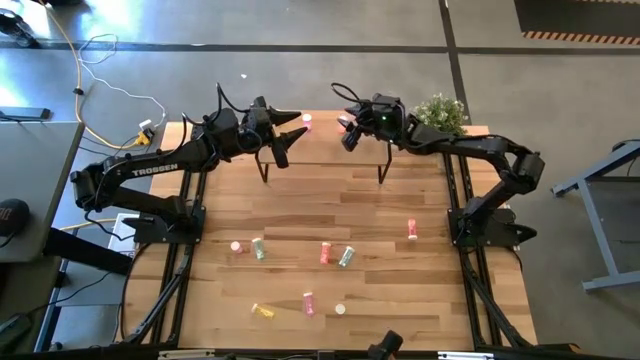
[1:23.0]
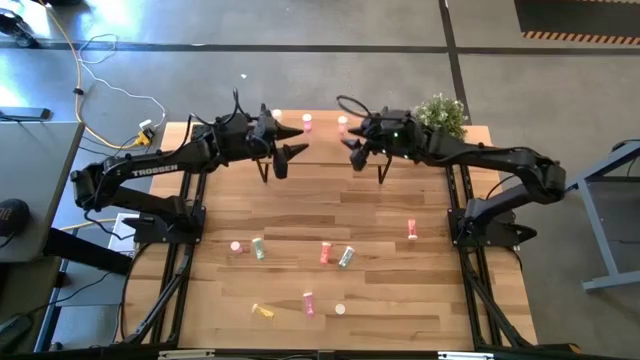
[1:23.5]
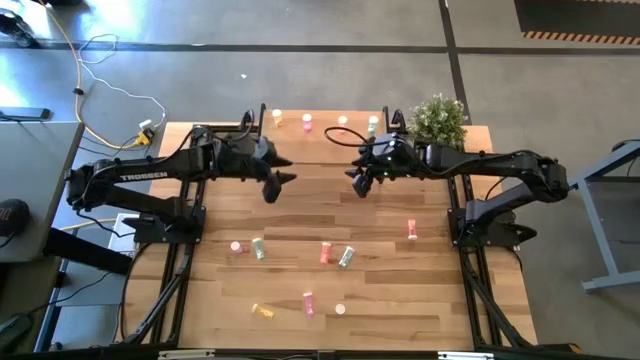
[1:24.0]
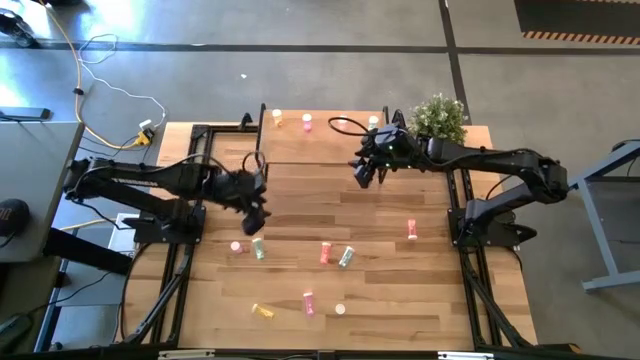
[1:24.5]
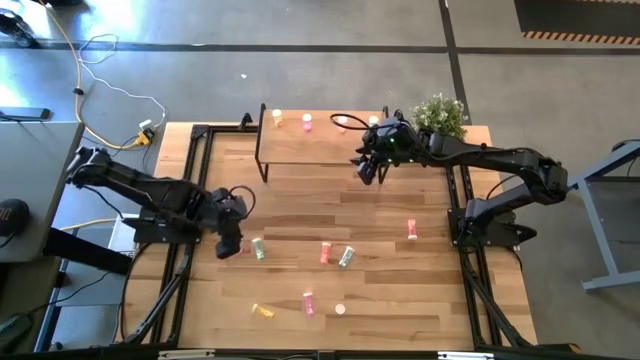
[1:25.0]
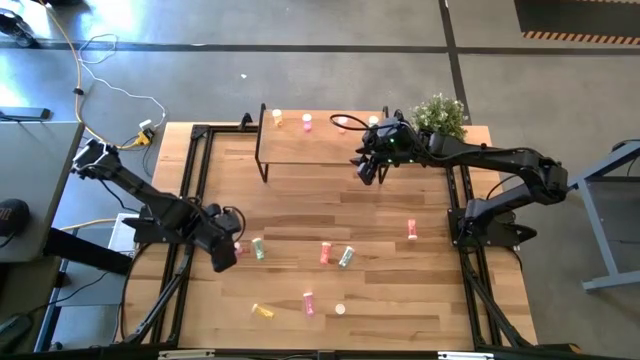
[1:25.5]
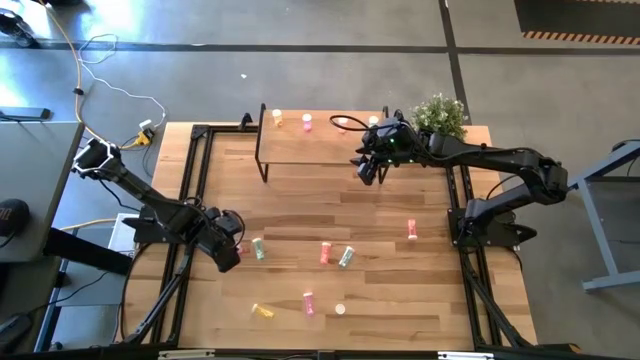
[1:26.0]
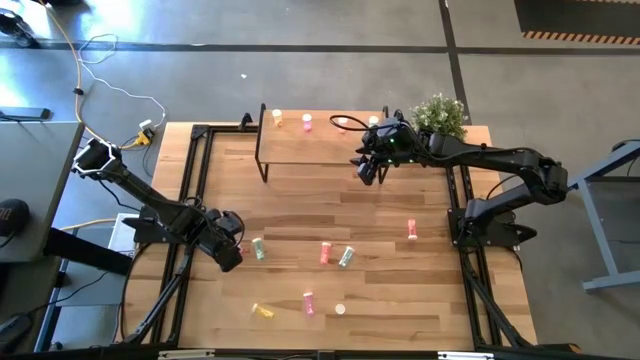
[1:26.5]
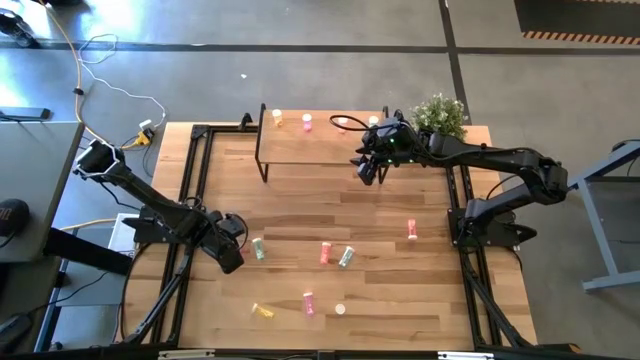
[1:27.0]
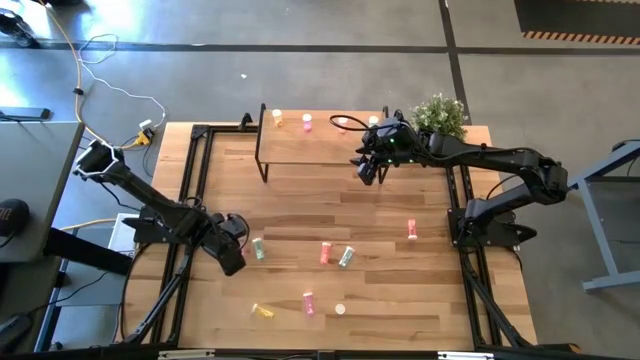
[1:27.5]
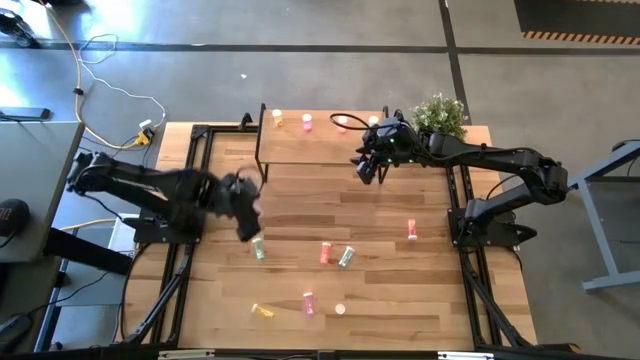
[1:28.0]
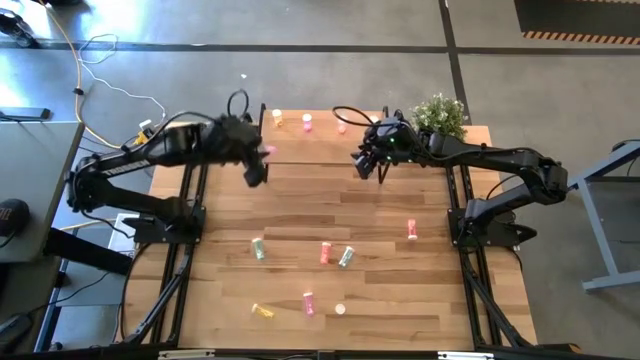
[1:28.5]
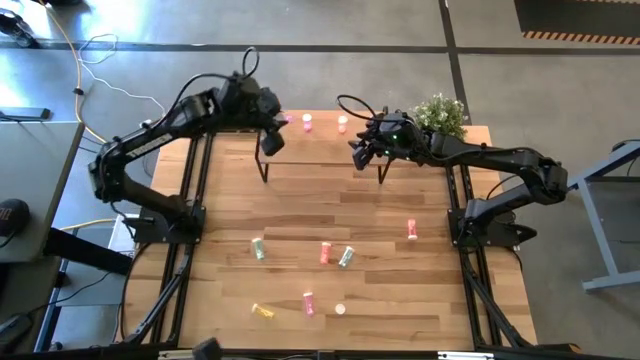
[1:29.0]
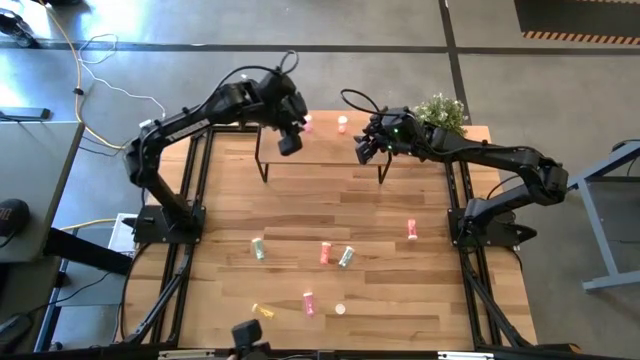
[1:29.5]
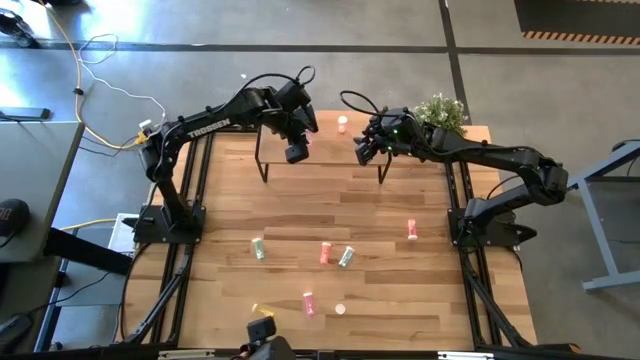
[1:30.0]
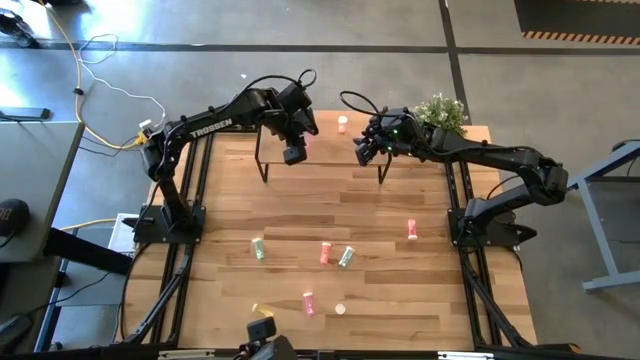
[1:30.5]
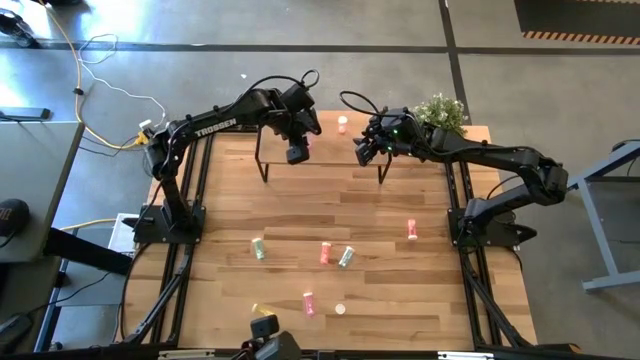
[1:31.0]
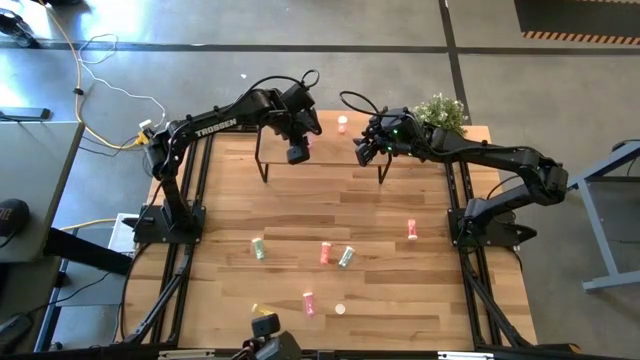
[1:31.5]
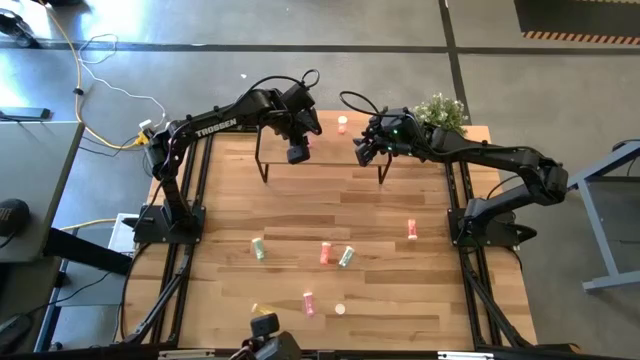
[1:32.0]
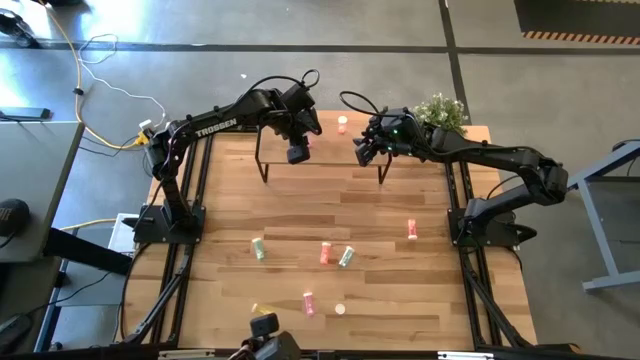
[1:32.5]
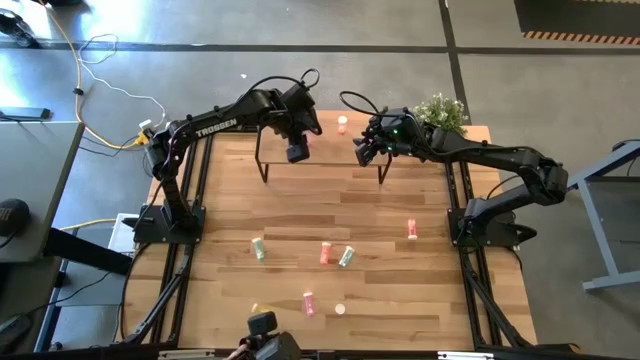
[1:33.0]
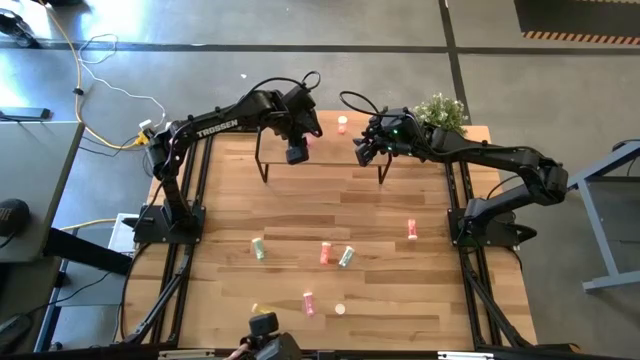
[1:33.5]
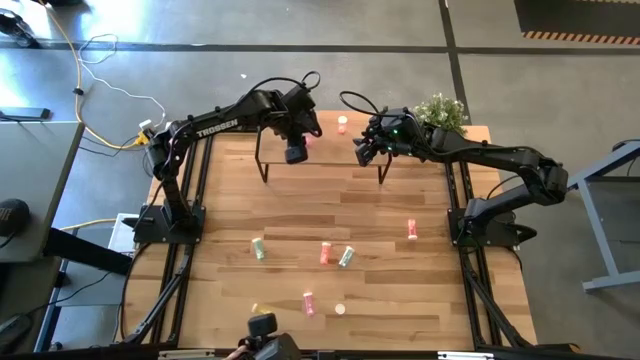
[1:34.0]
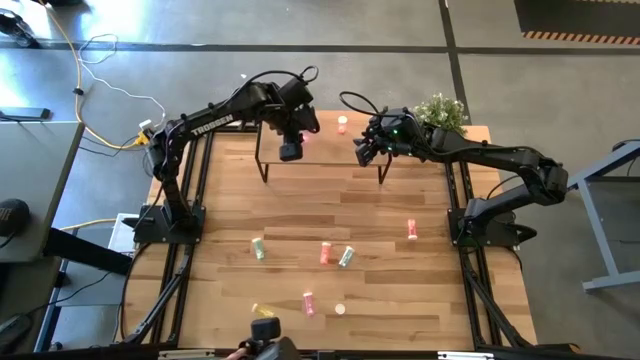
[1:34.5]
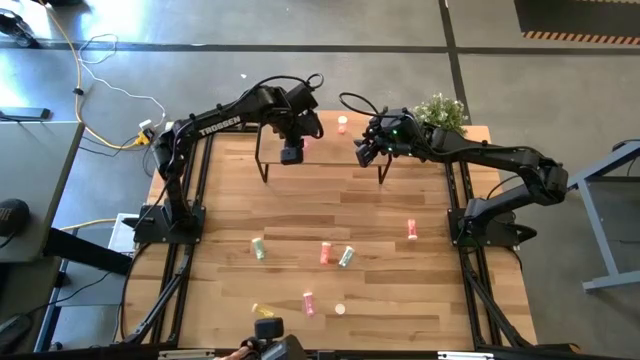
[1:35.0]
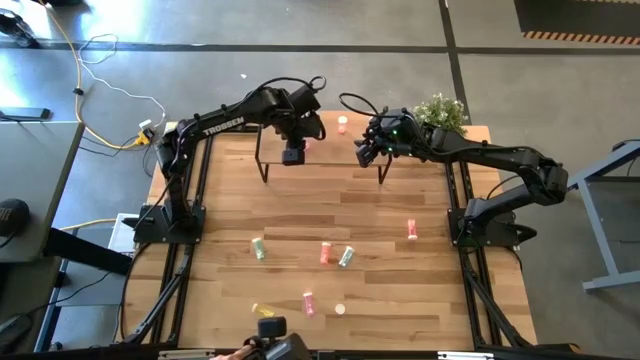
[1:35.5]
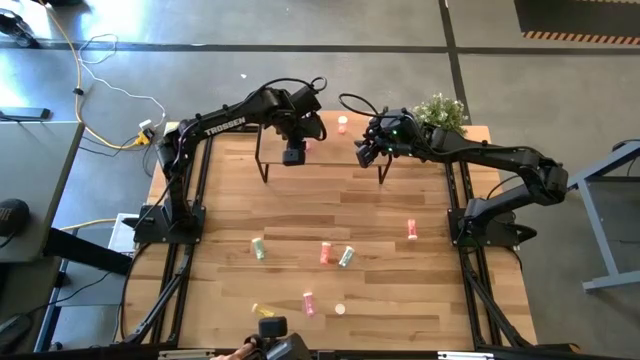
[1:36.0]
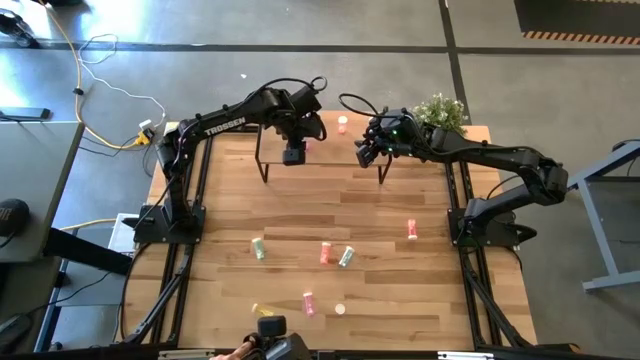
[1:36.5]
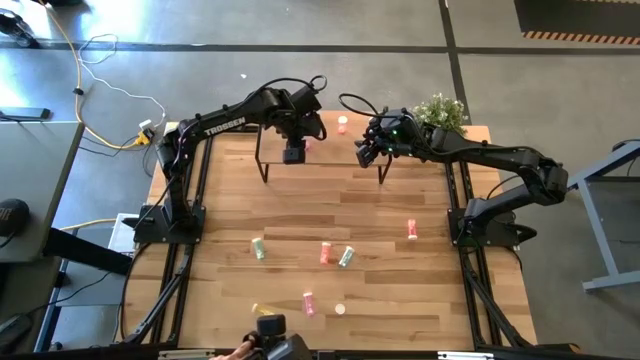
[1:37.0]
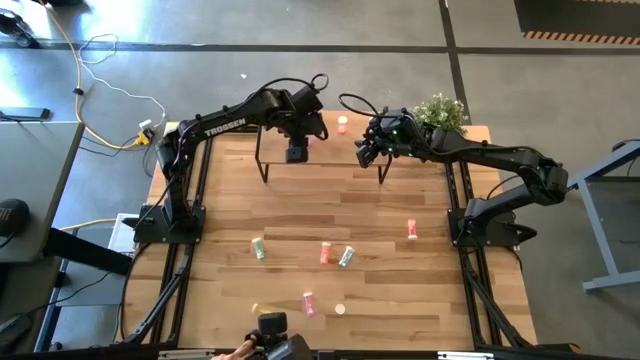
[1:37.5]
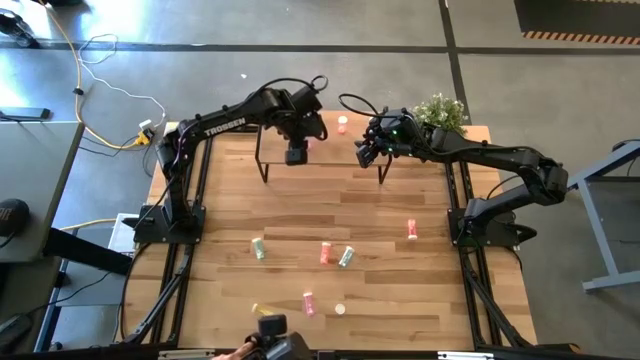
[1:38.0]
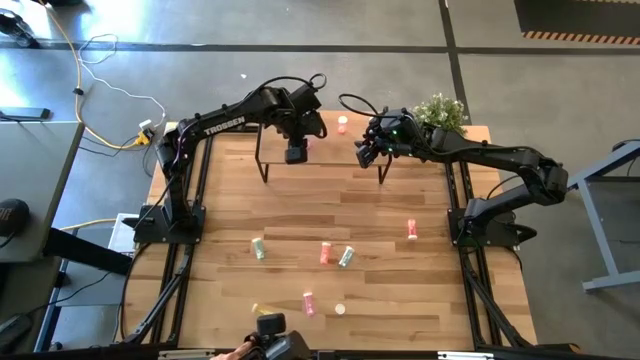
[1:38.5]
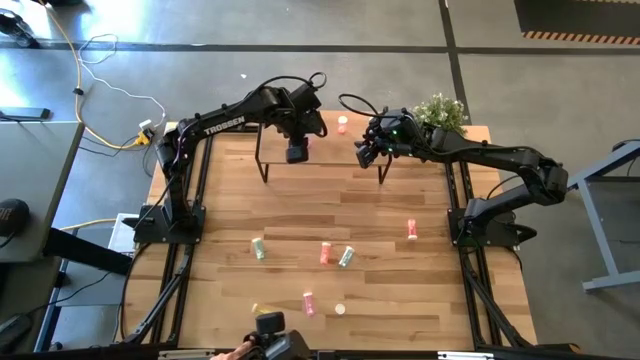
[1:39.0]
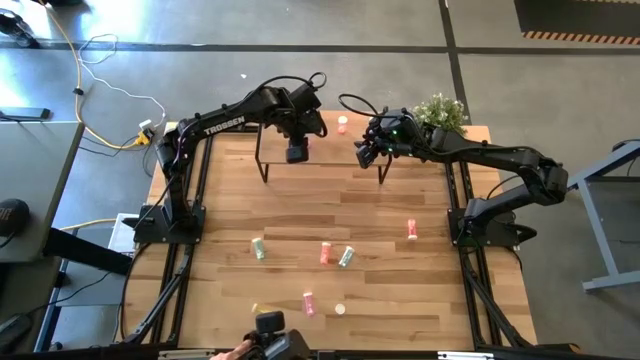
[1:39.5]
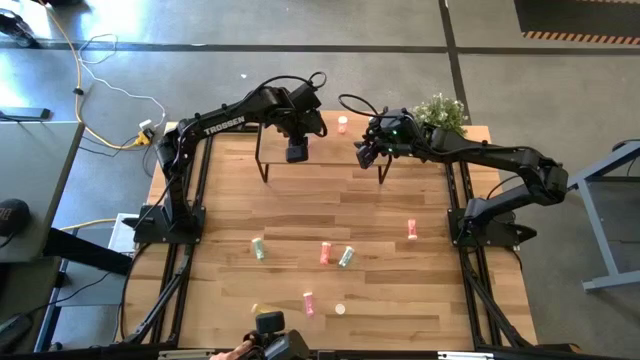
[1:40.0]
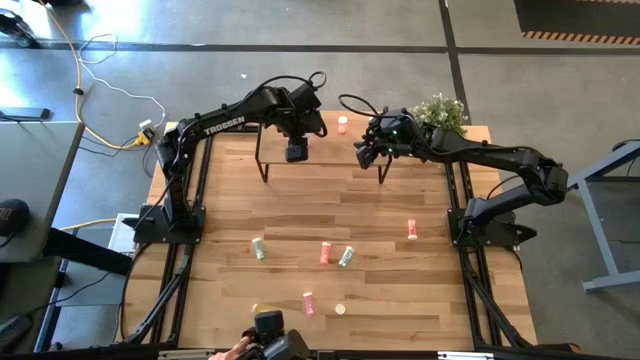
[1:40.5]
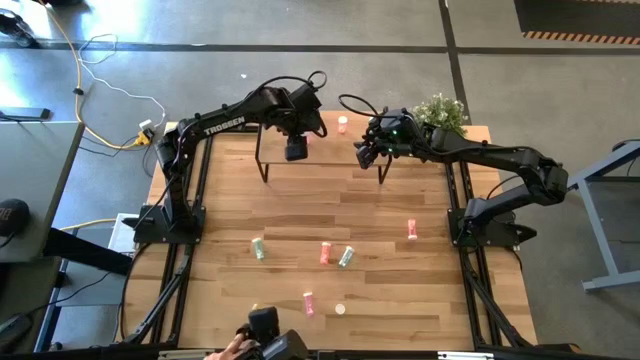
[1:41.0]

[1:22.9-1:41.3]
Task: Pick and place medicine bottles onto shelf by color
Put the top purple pill bottle on the shelf aligned with other purple pill bottles
